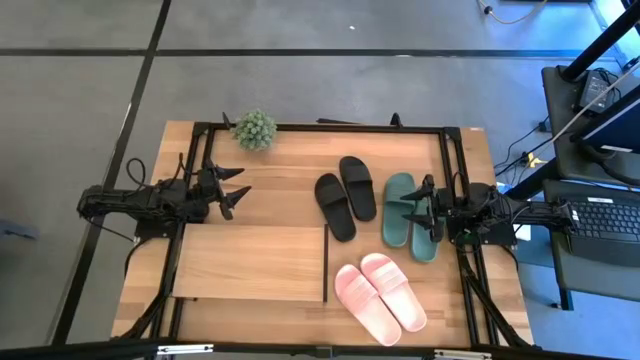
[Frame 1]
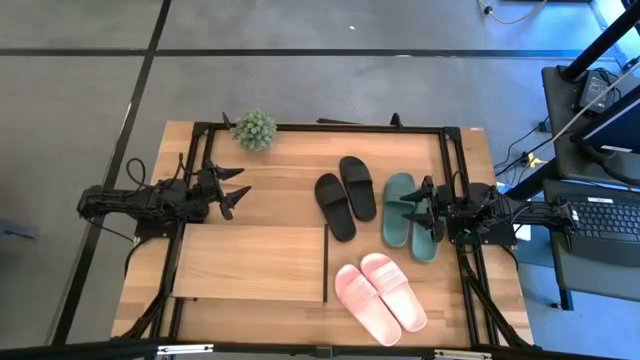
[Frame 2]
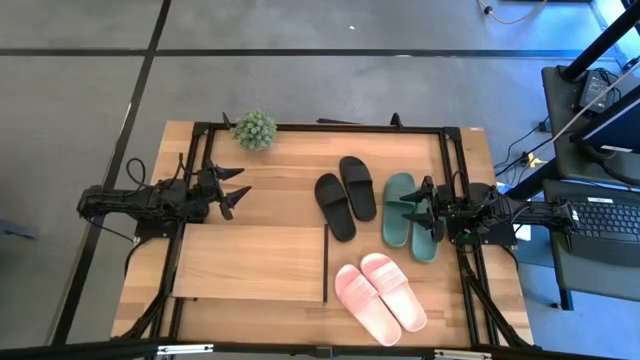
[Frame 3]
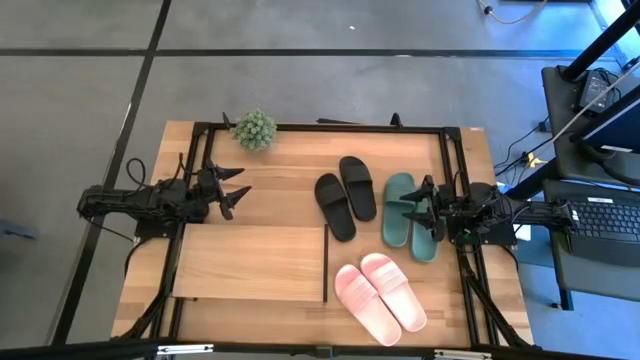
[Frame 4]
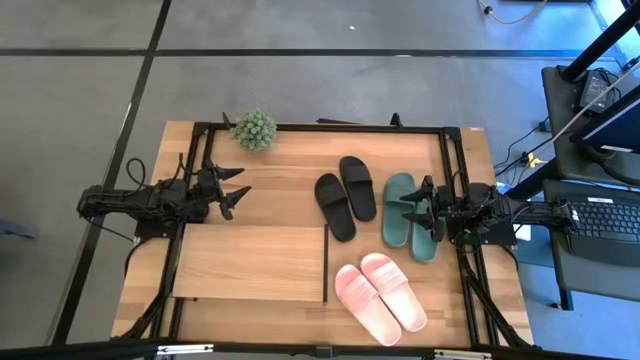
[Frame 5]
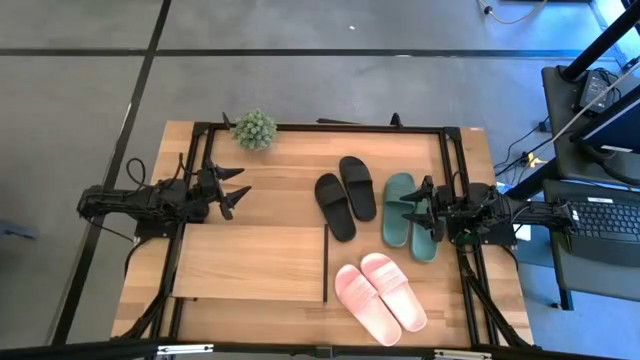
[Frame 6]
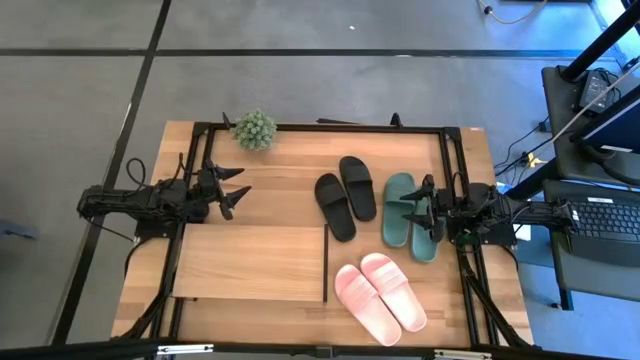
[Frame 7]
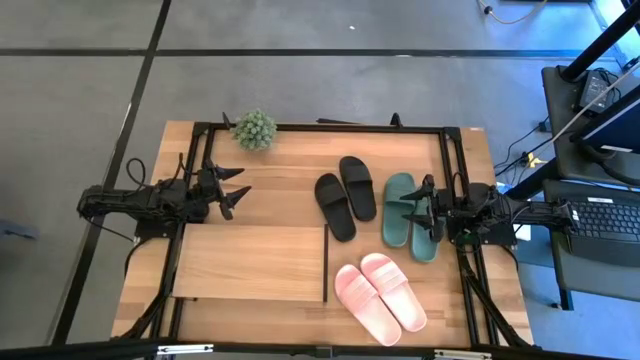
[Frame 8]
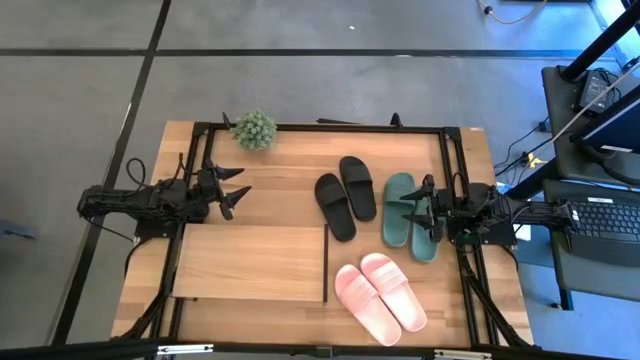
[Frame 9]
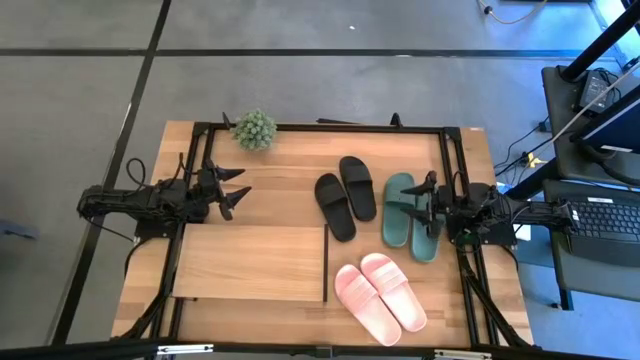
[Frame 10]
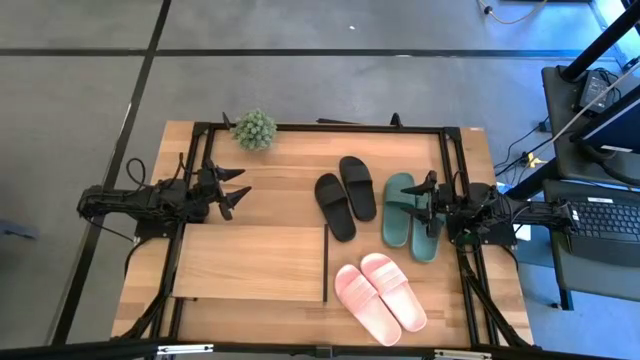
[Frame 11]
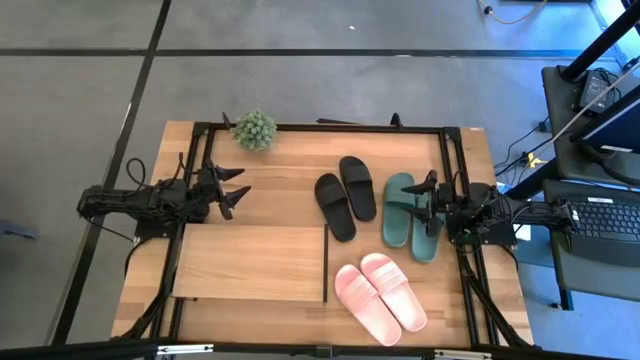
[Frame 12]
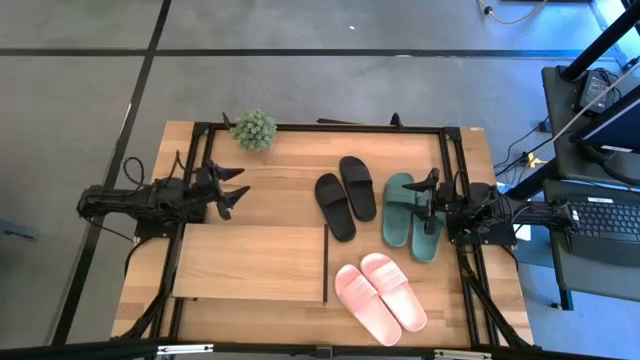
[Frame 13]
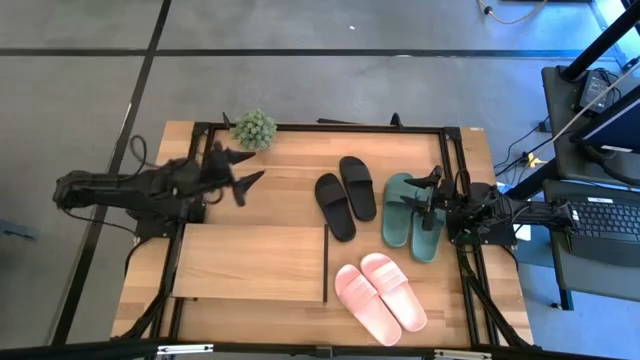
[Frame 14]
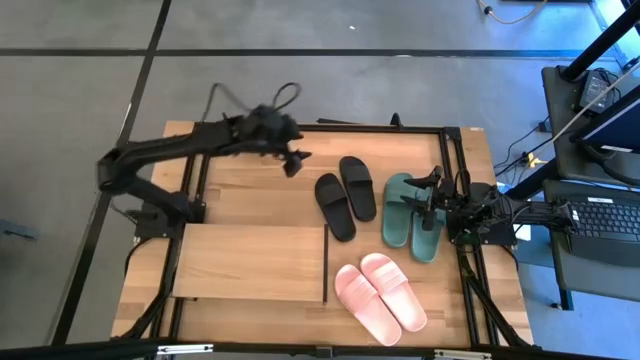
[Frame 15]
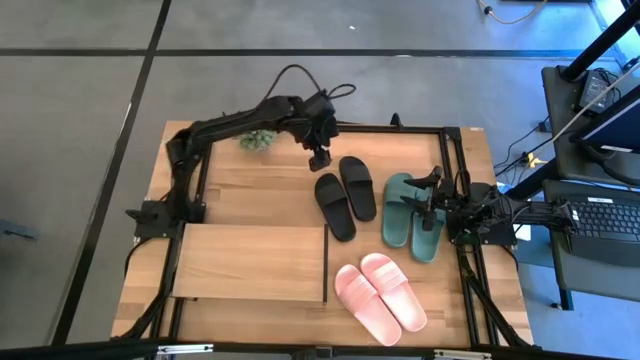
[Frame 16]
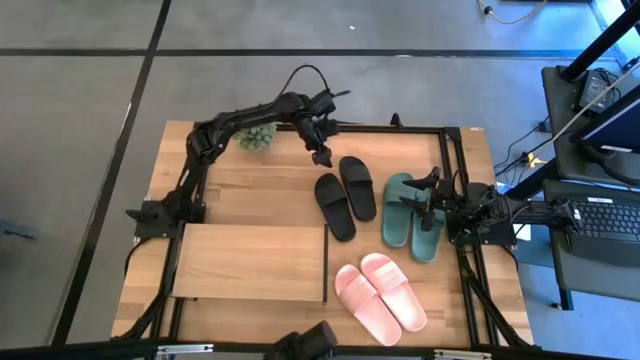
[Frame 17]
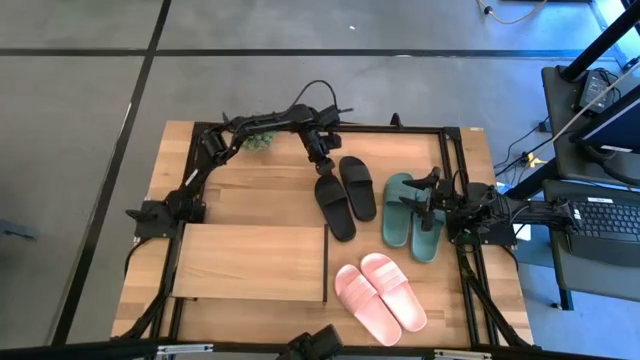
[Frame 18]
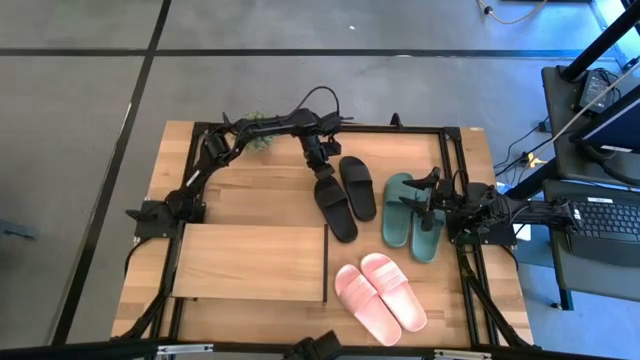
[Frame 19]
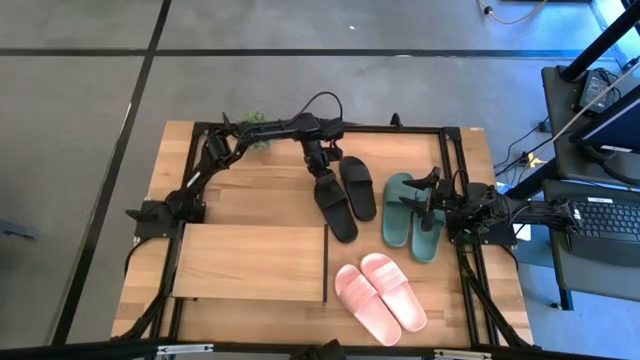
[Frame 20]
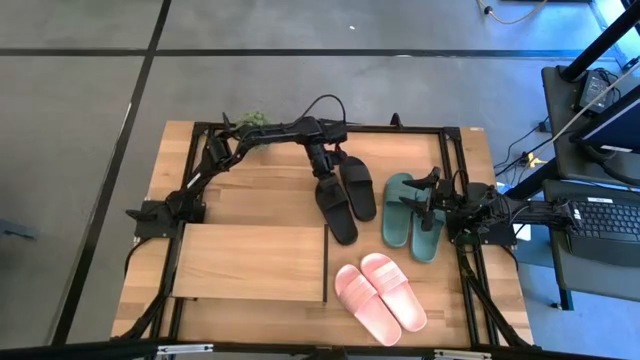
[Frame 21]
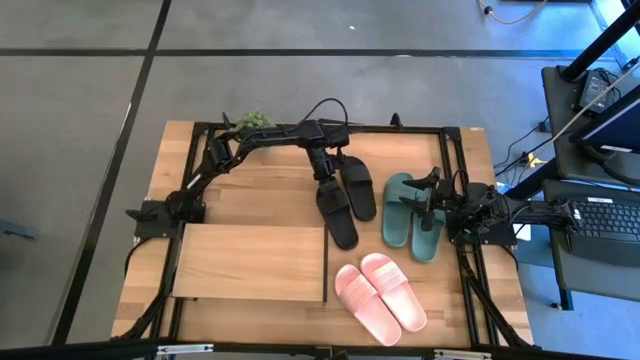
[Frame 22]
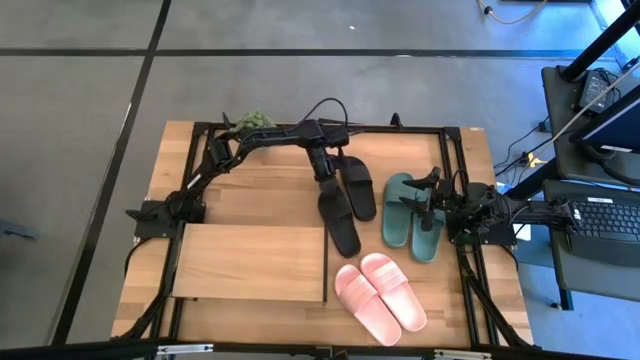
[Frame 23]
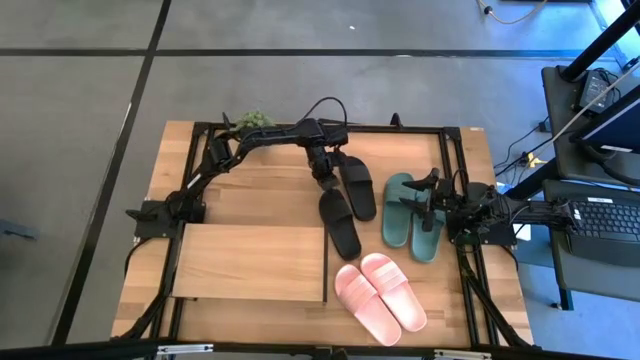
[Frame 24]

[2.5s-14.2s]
Task: Pick and place slides into the shelf
Put the left black slipper on the shelf

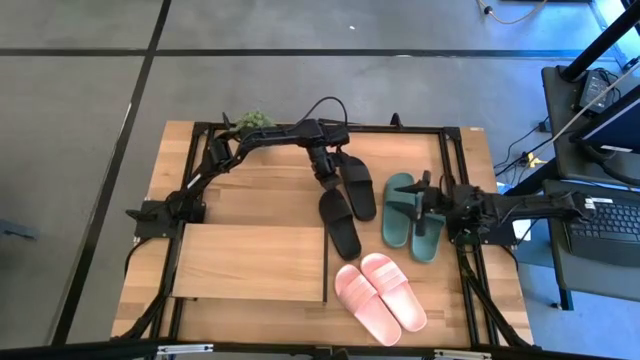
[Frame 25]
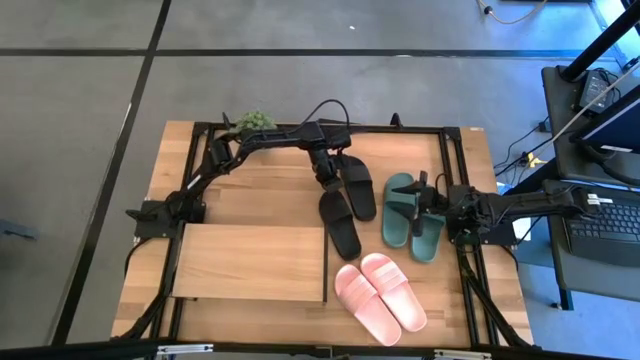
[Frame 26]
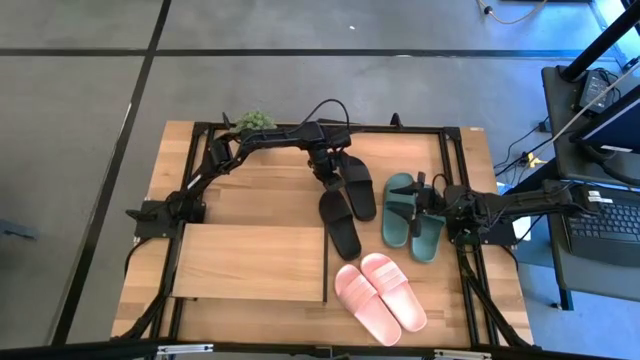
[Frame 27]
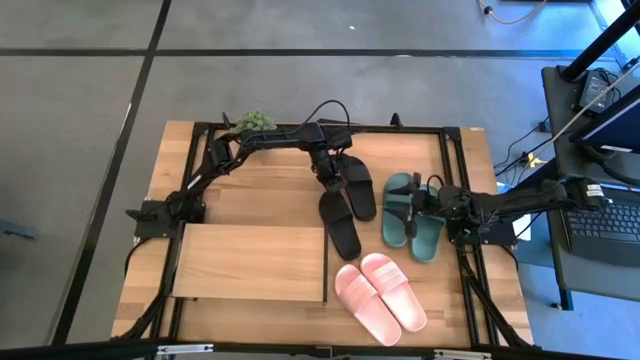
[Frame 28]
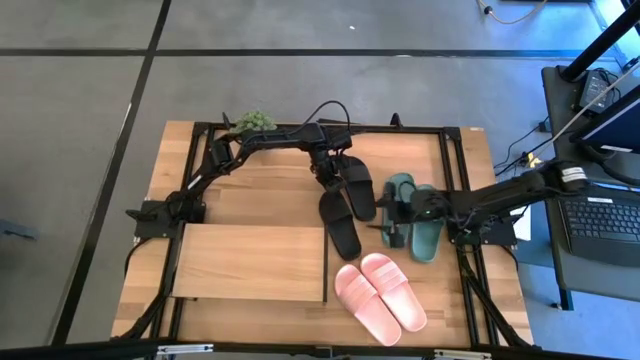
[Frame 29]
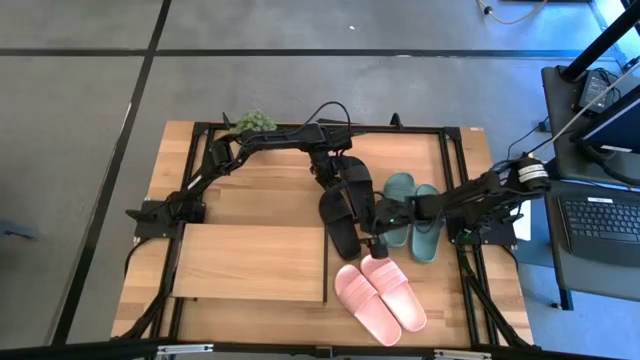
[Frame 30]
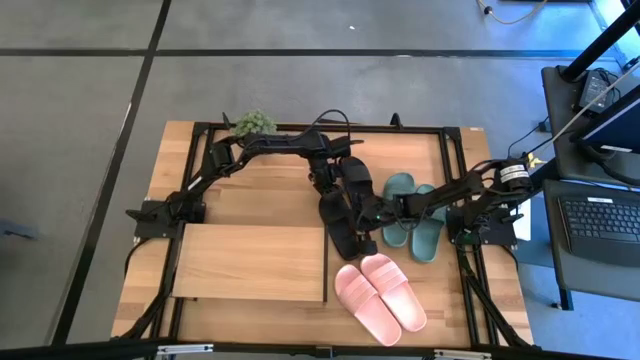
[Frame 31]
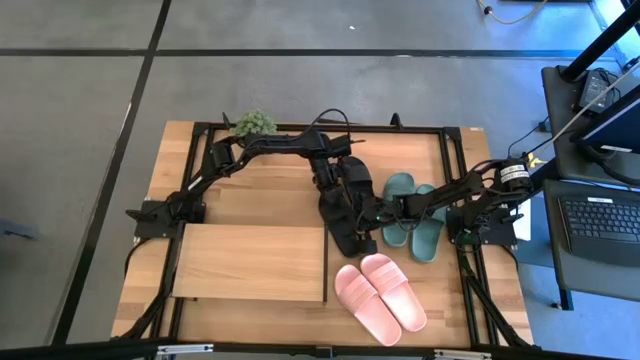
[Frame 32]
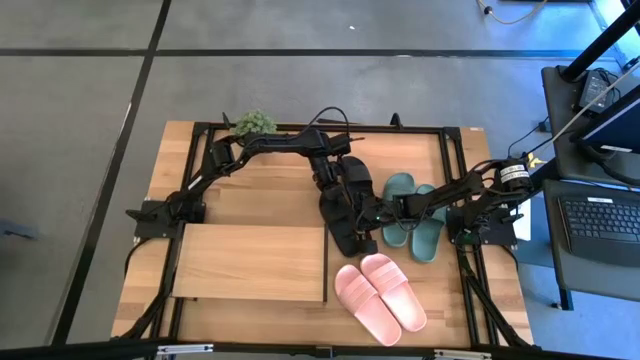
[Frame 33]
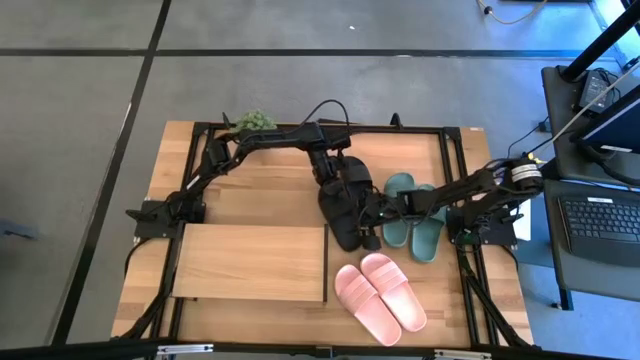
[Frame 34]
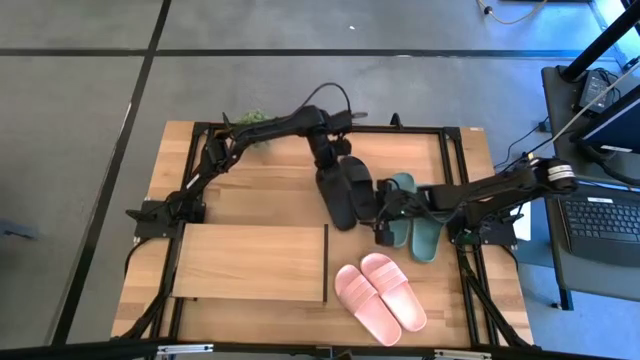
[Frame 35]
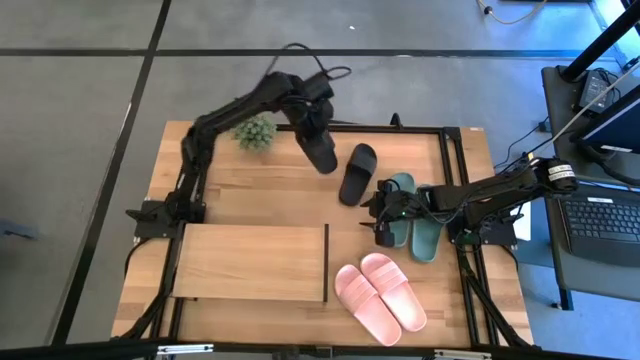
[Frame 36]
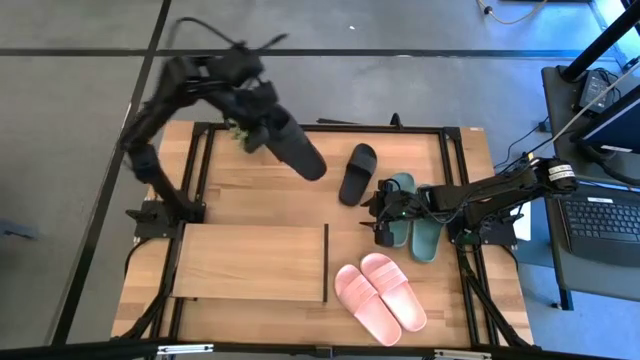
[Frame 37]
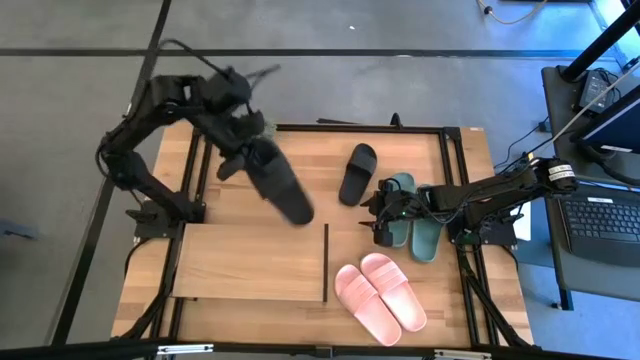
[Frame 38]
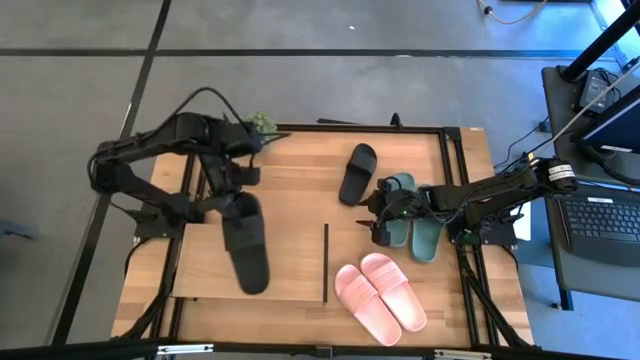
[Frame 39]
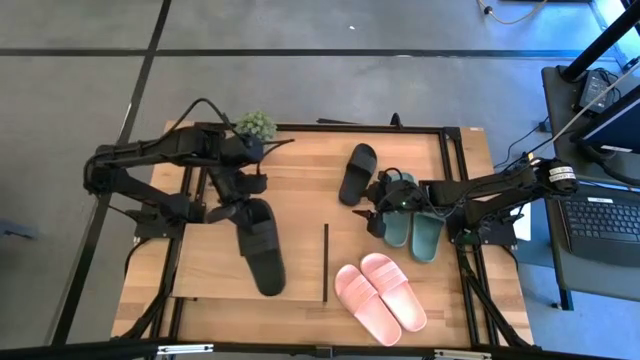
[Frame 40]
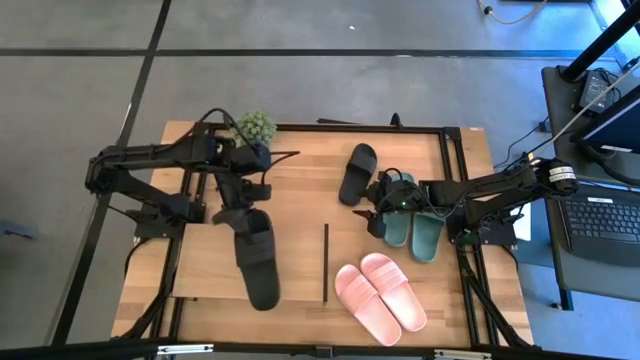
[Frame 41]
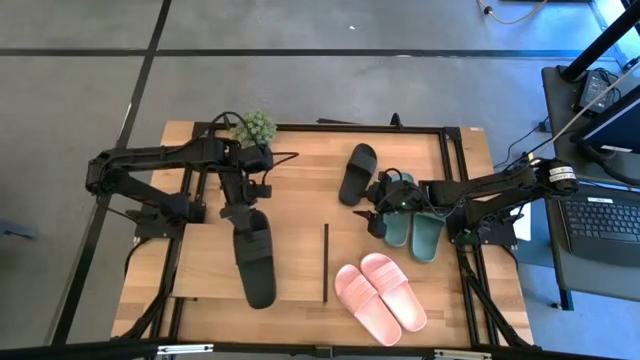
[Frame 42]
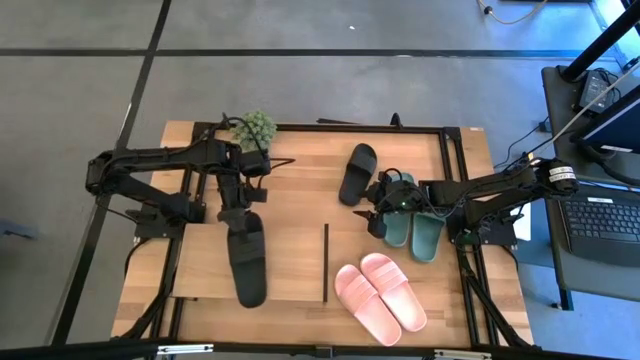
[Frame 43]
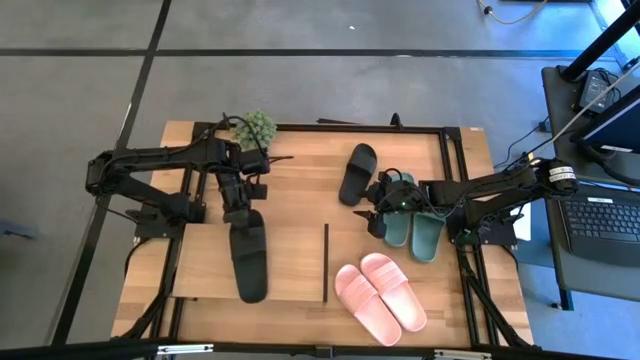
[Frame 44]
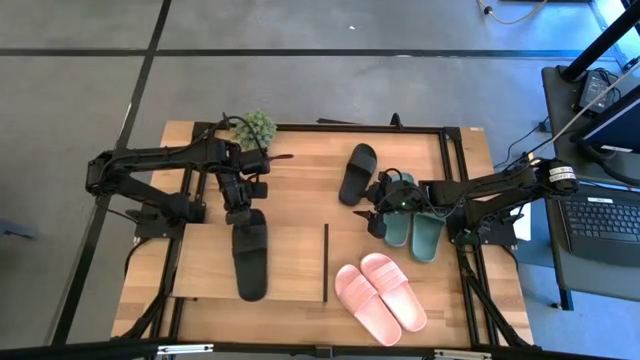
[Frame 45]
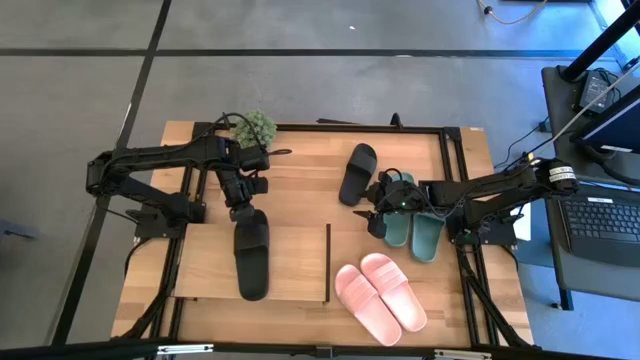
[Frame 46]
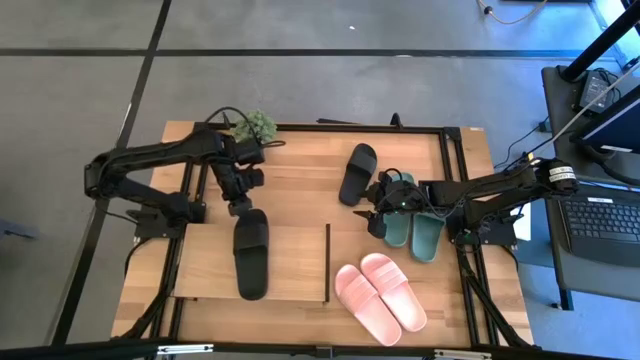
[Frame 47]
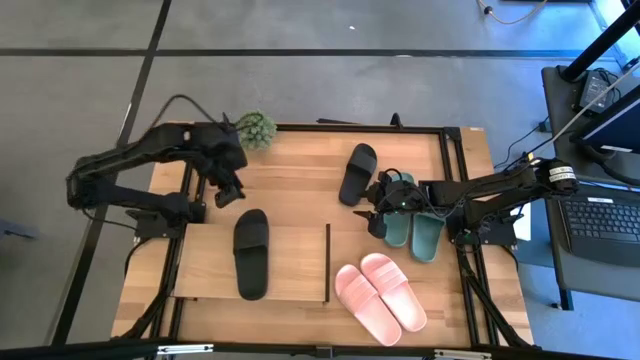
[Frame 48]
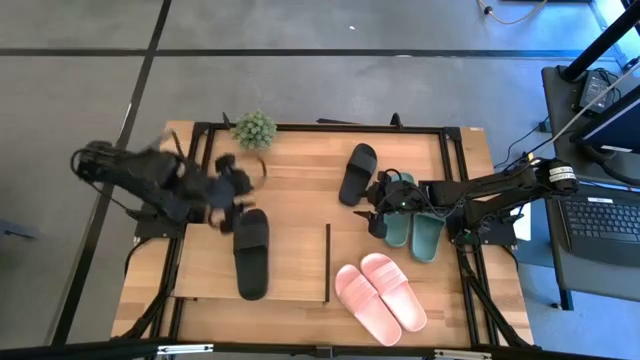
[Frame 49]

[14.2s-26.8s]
Put the left black slipper on the shelf
